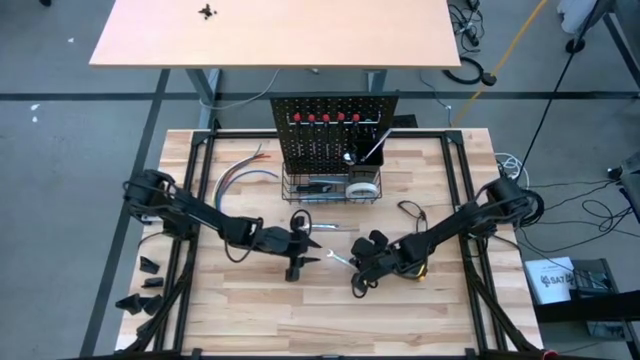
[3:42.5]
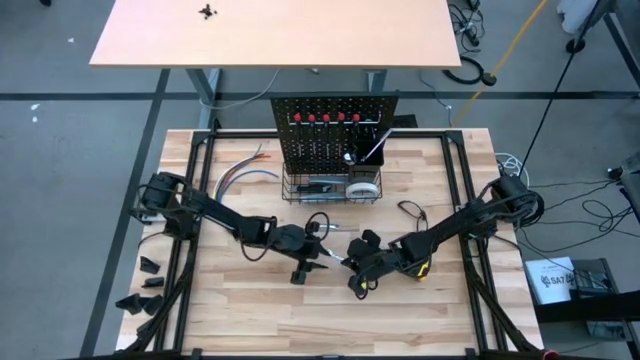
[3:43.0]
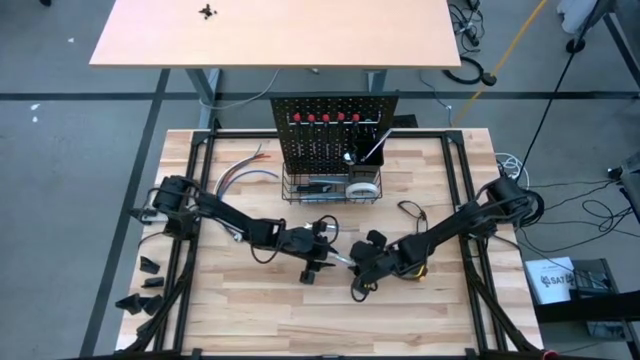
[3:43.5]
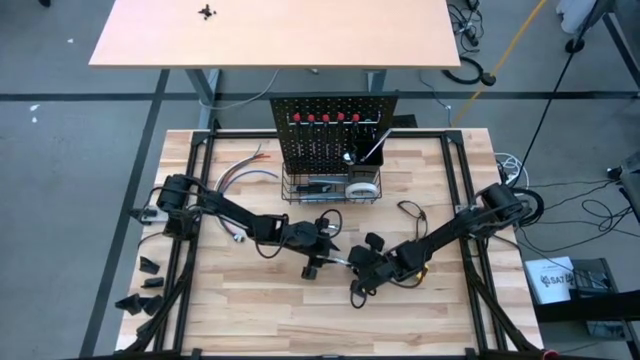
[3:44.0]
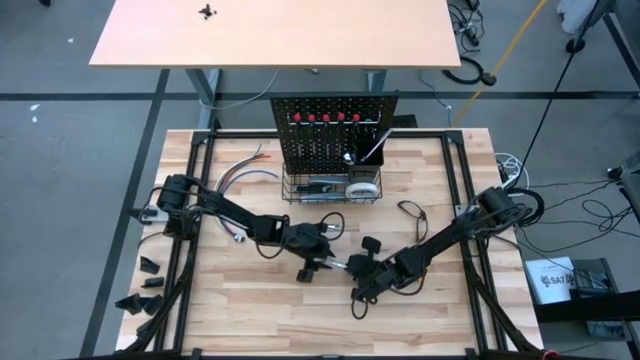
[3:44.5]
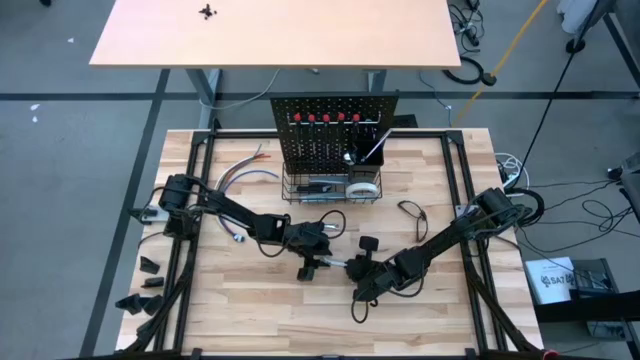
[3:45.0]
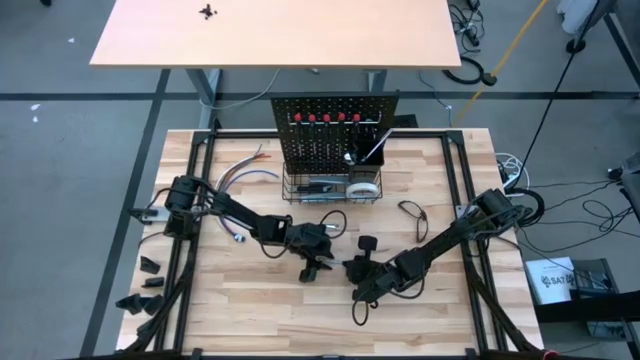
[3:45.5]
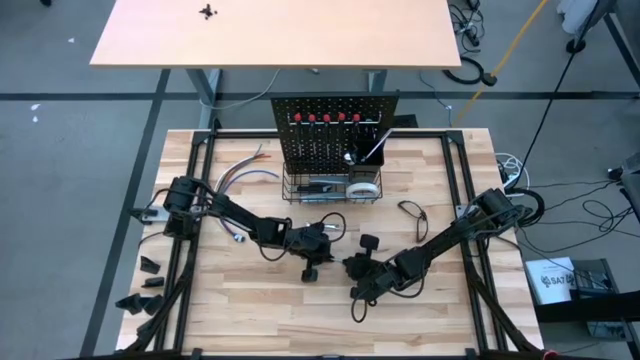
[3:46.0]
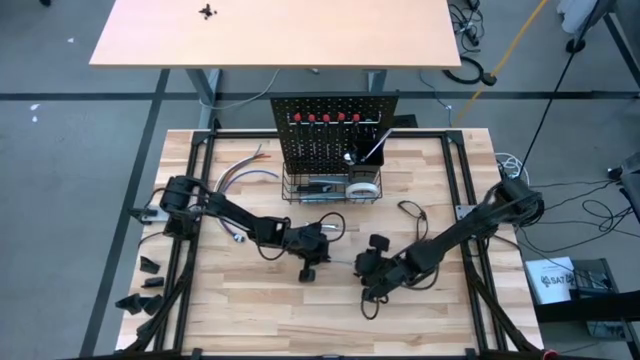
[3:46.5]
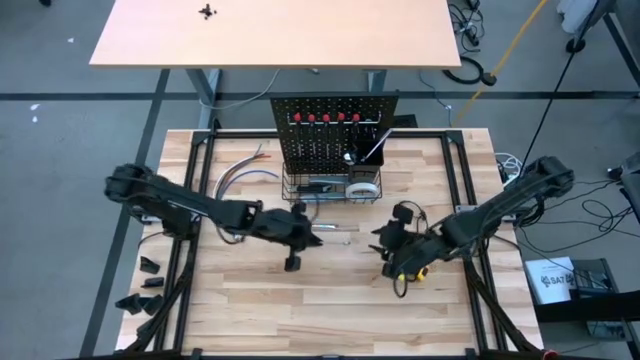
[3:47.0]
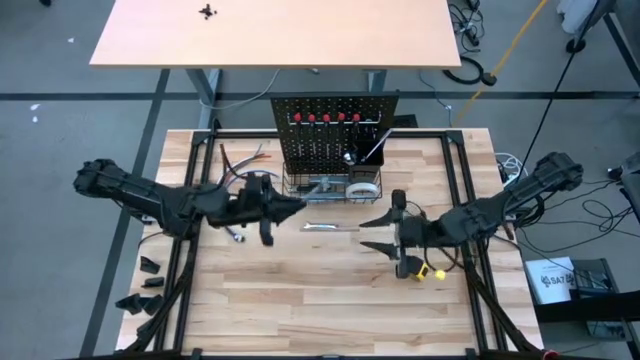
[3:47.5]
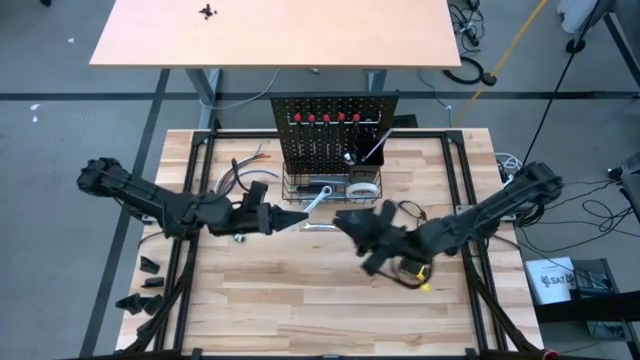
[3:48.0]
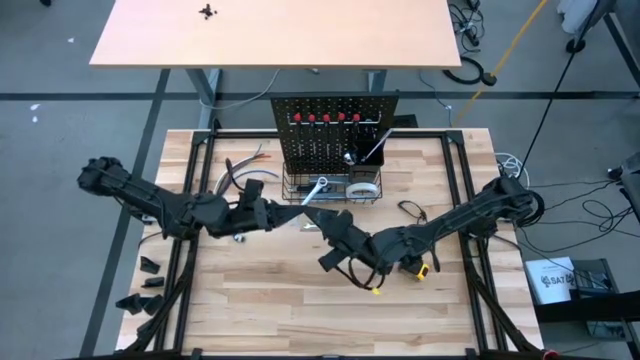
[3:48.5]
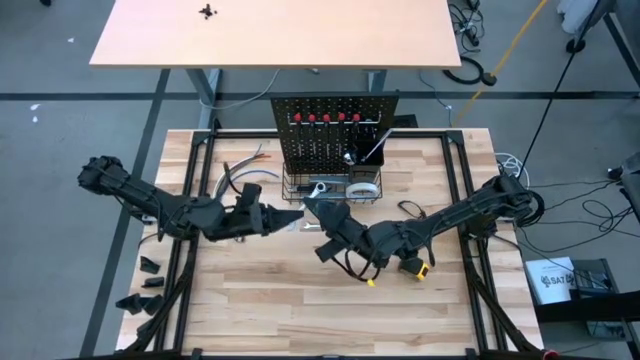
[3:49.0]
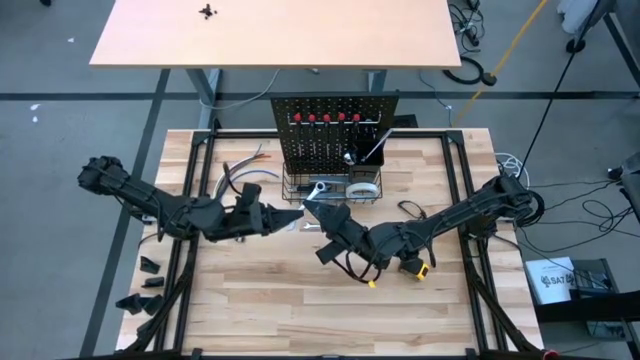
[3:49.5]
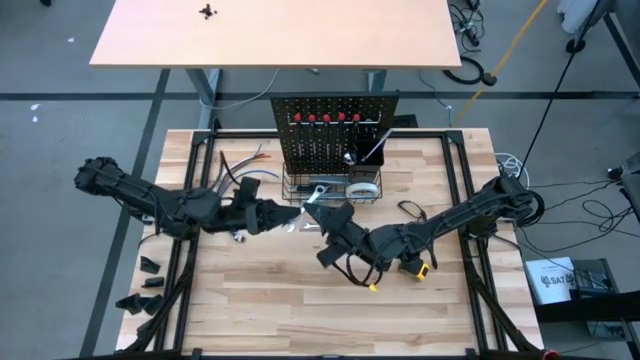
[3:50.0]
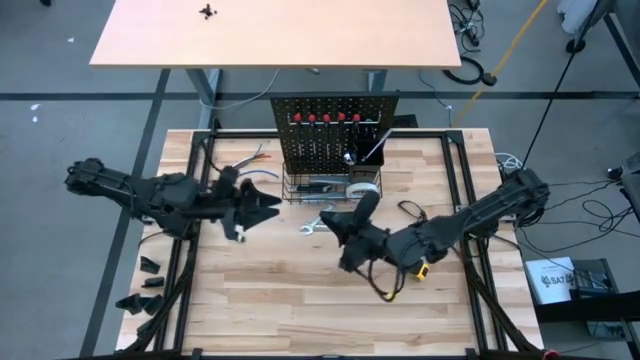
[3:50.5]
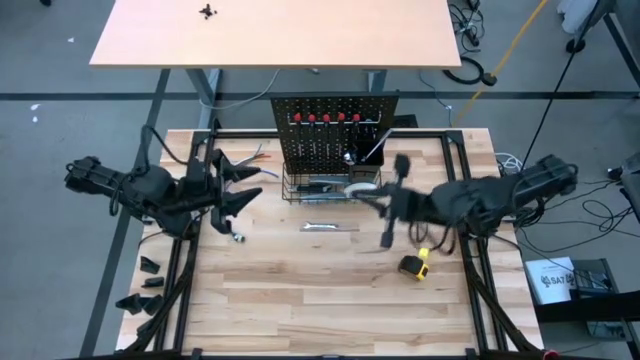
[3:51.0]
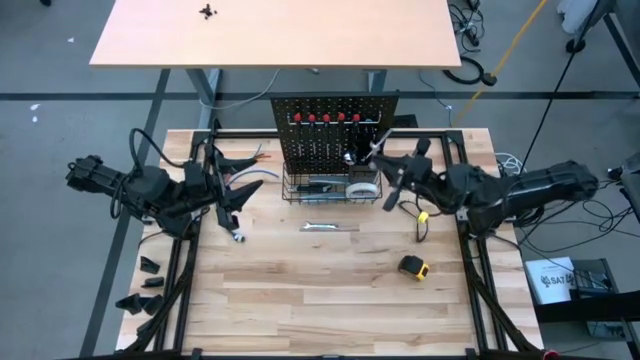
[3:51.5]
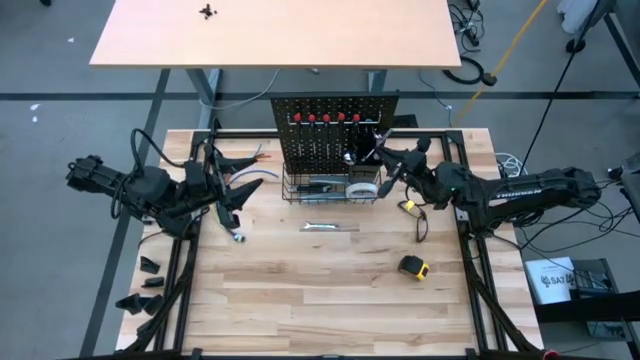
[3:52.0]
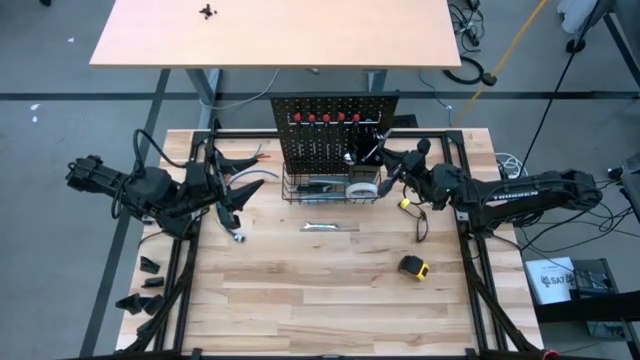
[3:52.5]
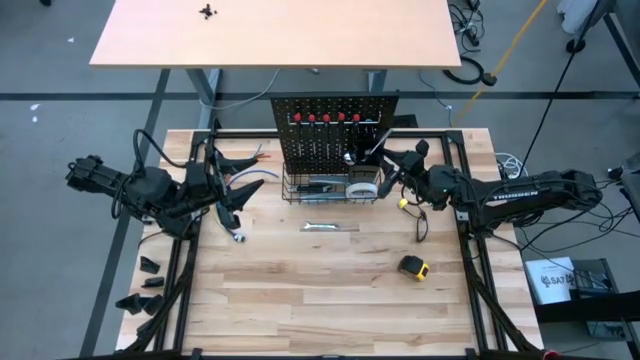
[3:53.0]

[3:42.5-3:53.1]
Task: Hang tools onto peg board
Put the wrench into the pegboard bin

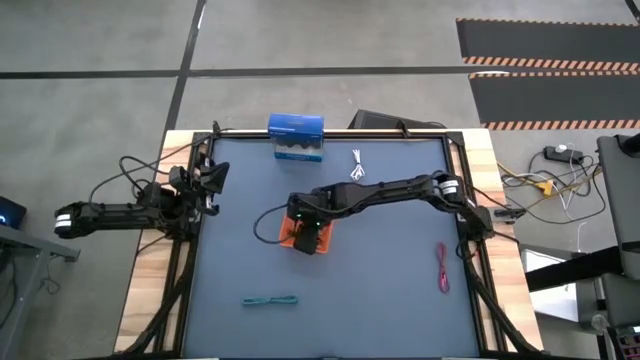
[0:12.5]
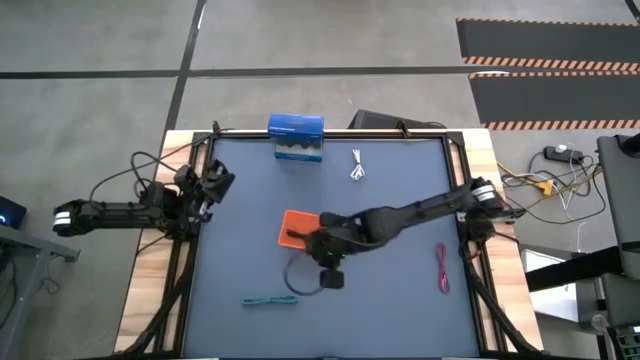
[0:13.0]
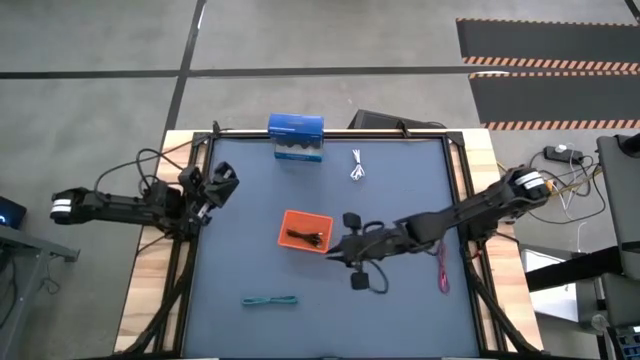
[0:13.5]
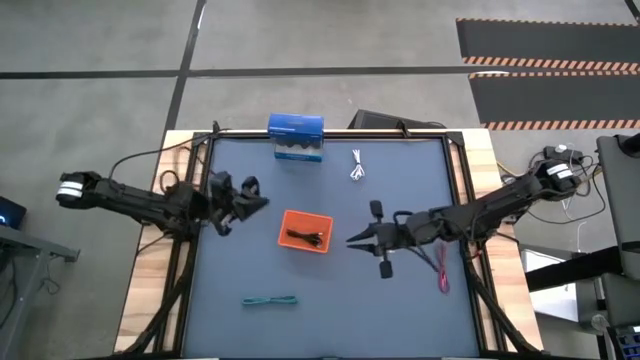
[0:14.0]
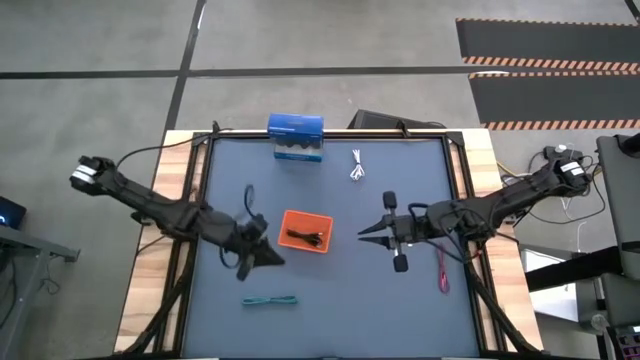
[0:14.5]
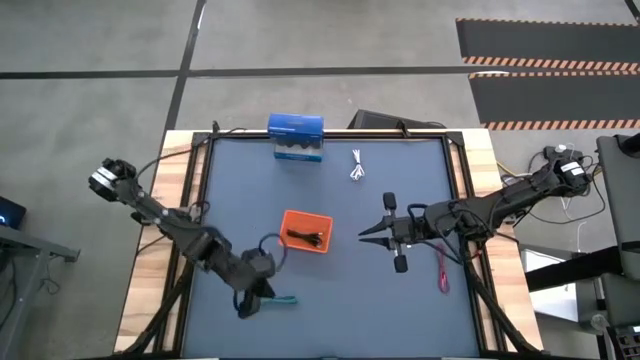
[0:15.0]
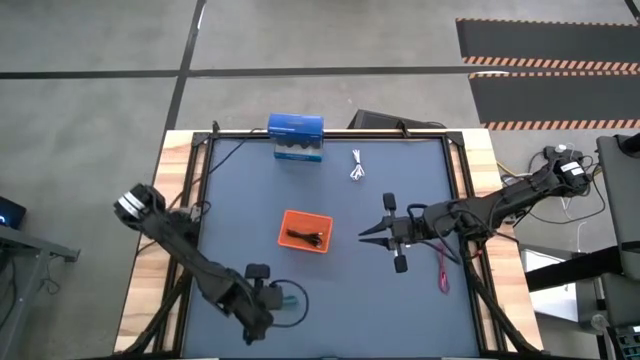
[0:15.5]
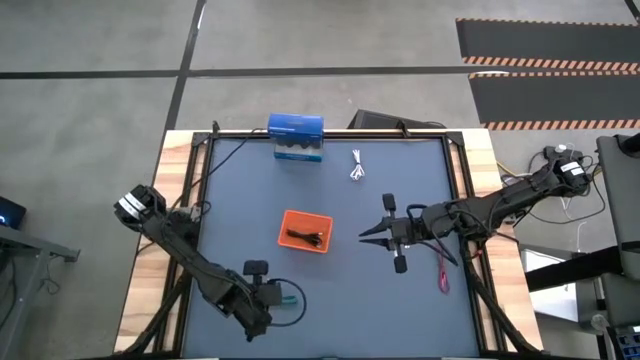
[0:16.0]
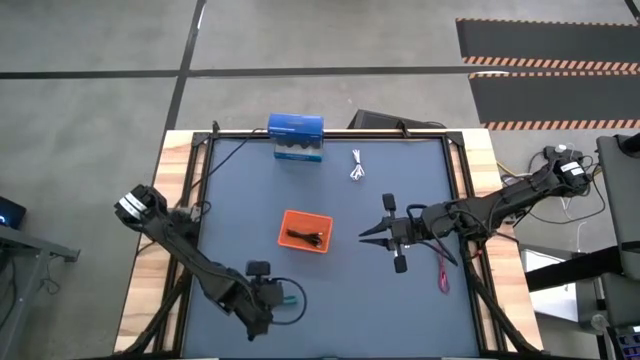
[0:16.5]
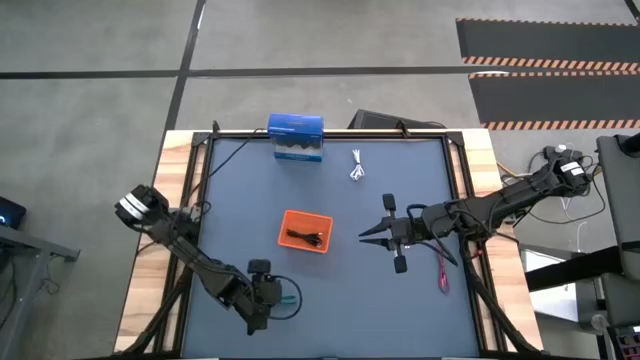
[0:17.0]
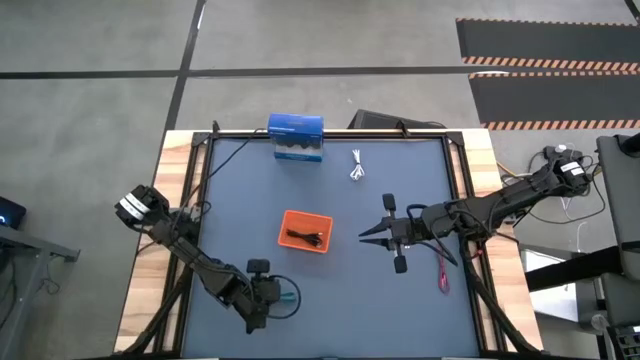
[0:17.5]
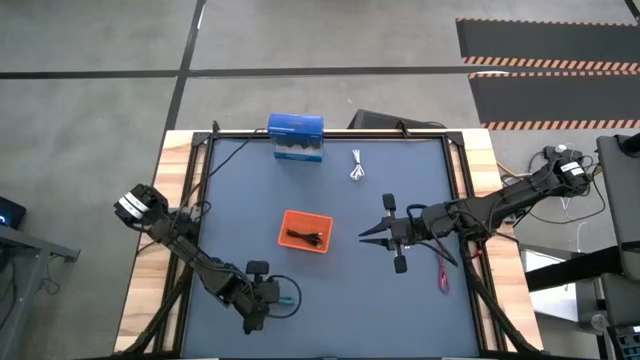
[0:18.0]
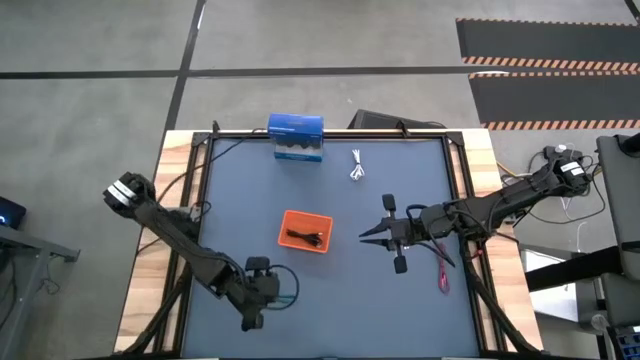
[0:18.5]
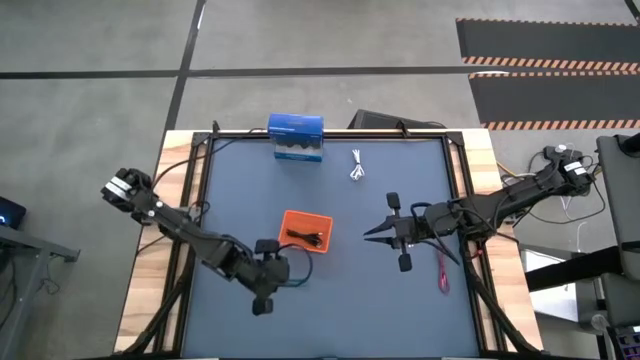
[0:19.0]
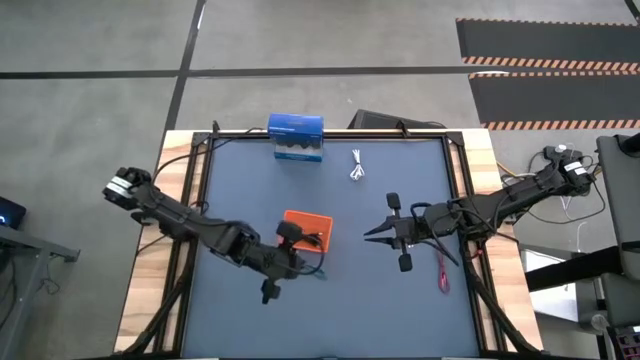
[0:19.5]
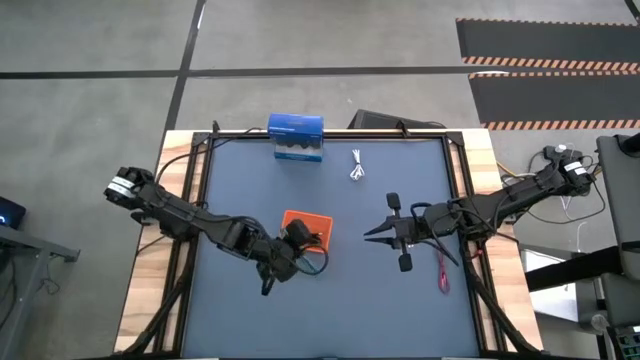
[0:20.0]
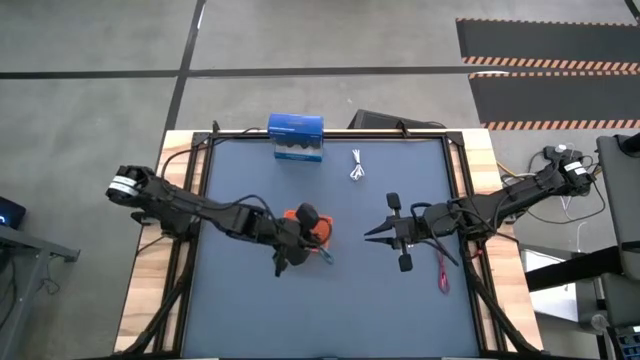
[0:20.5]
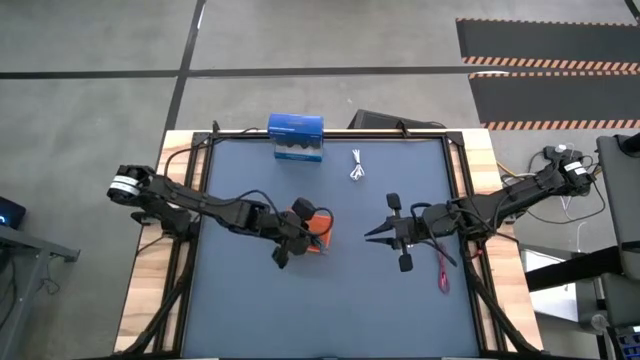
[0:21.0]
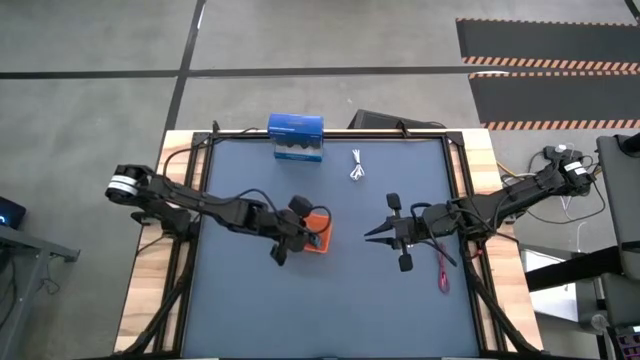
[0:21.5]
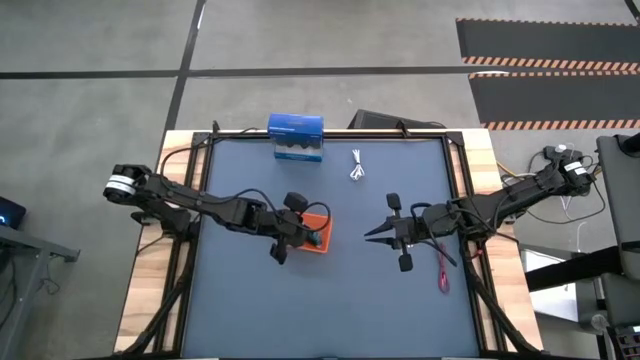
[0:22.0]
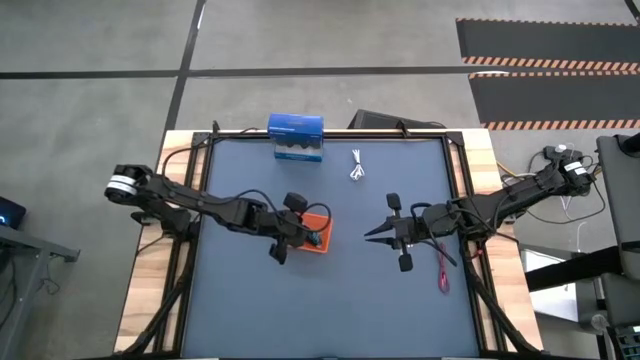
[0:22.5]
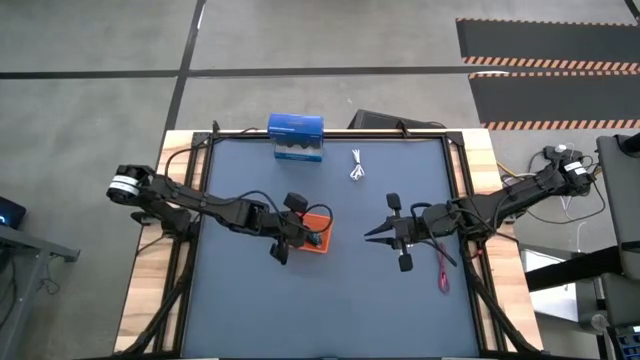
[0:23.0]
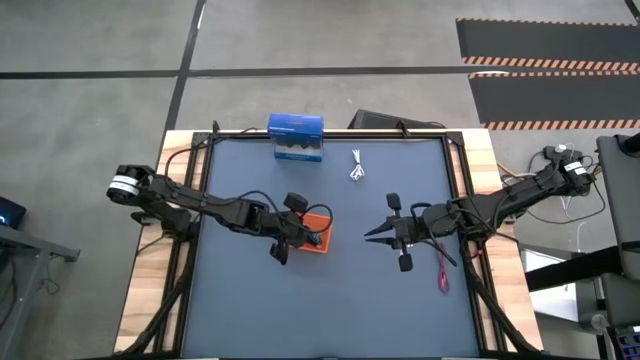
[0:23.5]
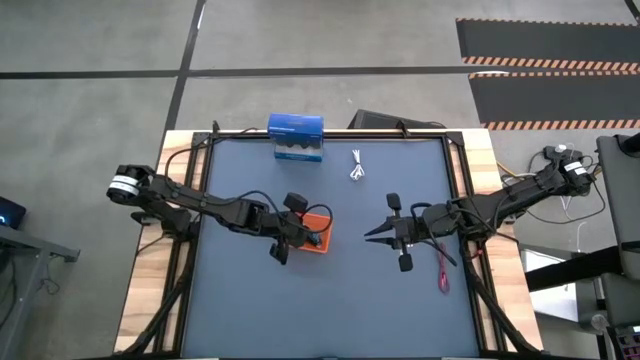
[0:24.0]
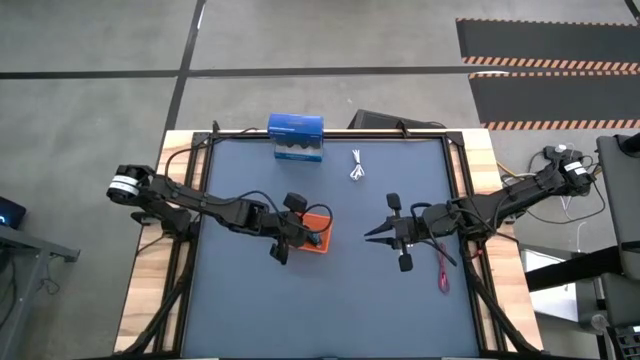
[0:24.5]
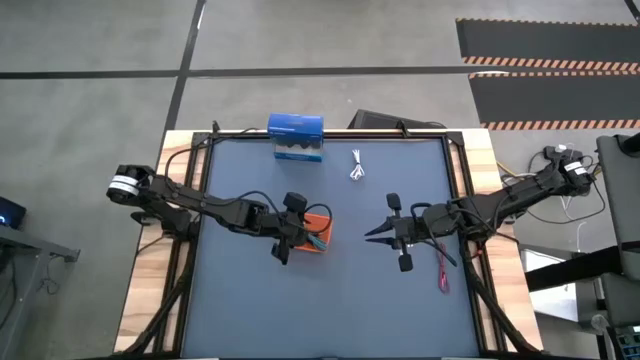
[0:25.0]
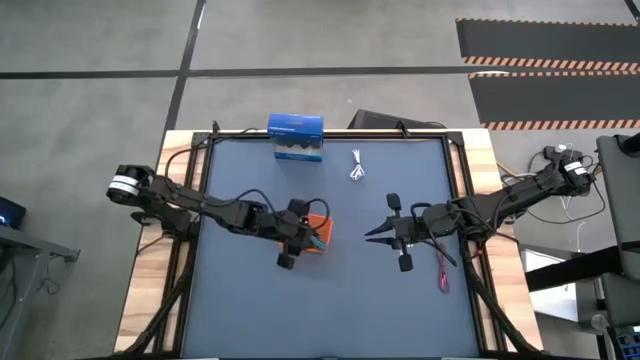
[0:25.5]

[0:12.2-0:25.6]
Task: Pick and place USB-C Cables
Put the blue charger cable into the orange bin
